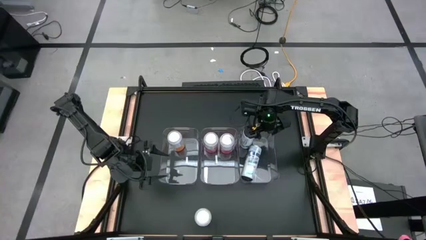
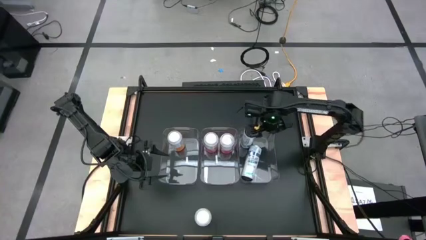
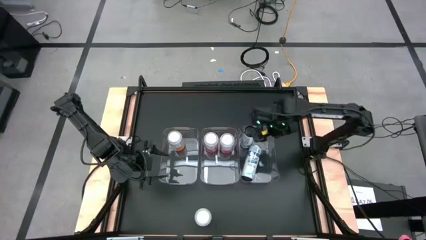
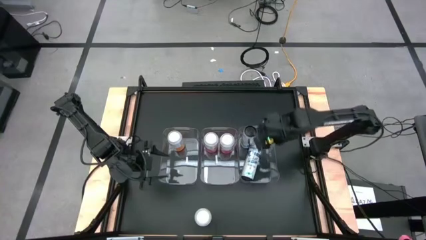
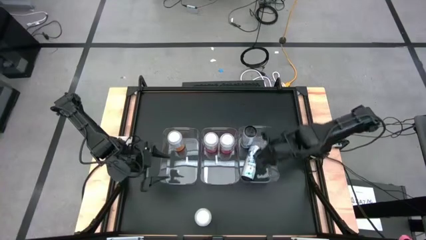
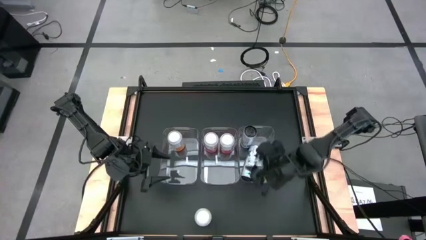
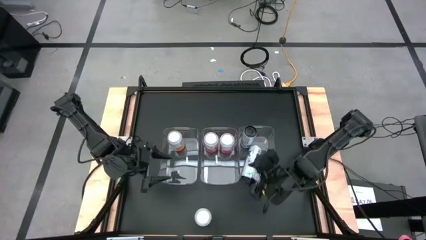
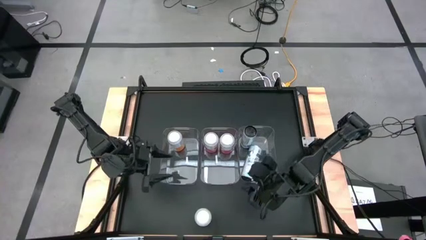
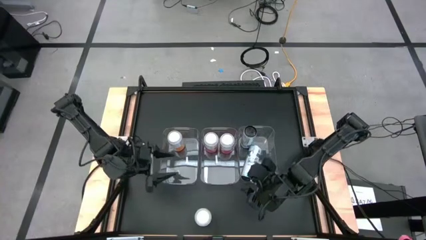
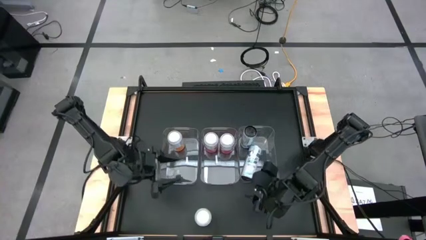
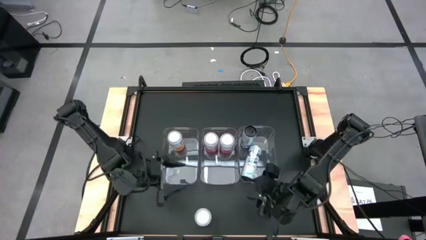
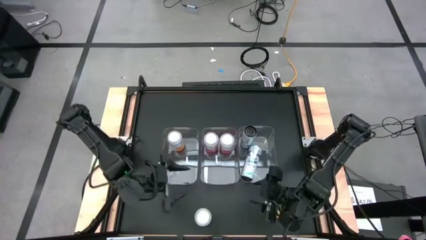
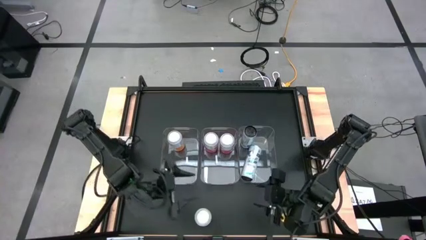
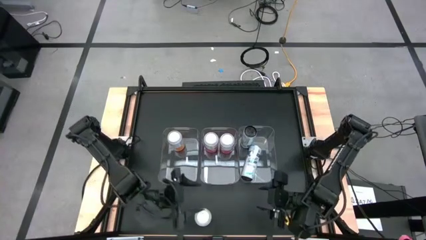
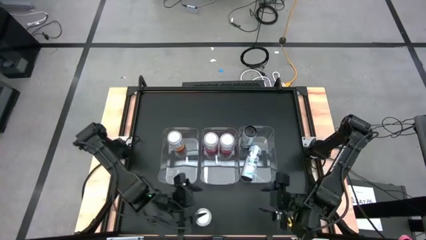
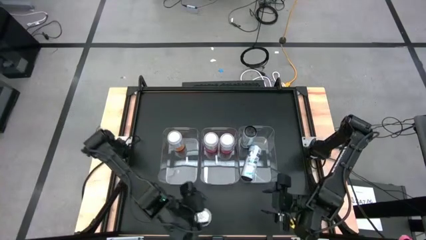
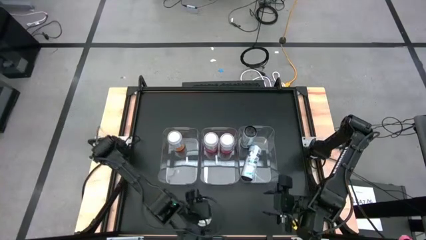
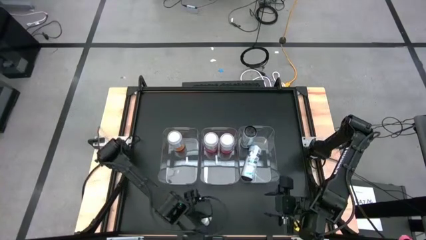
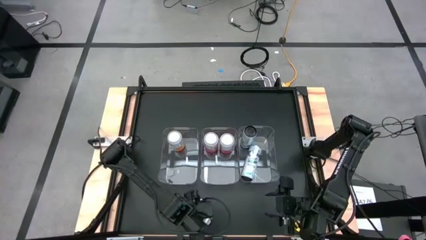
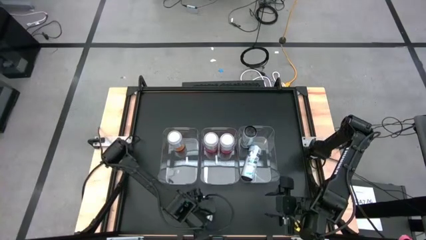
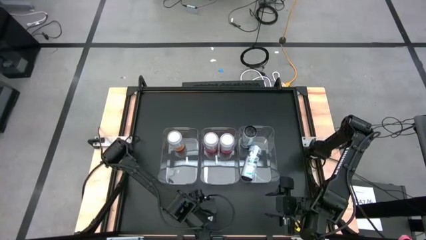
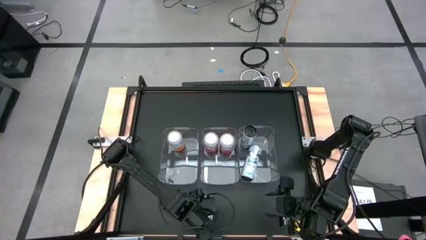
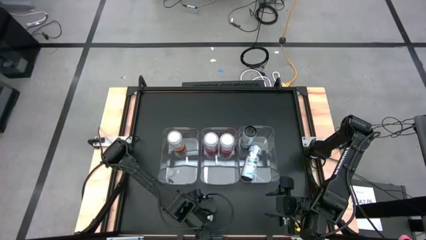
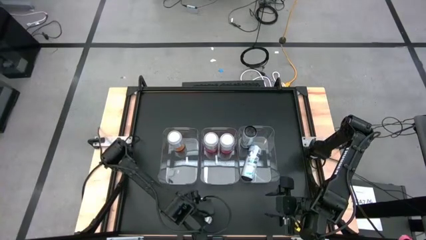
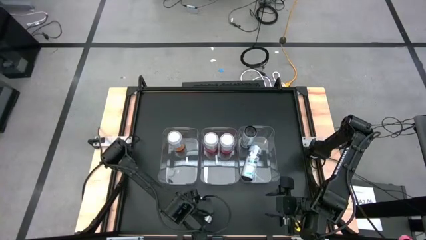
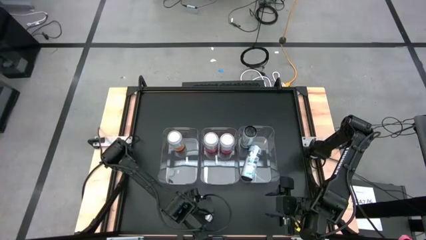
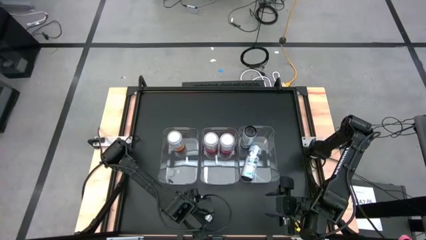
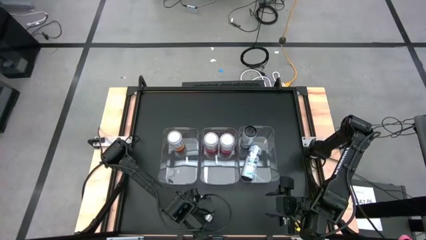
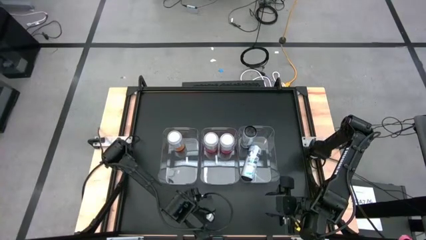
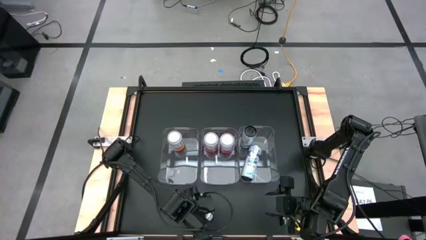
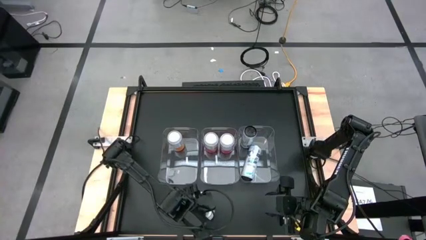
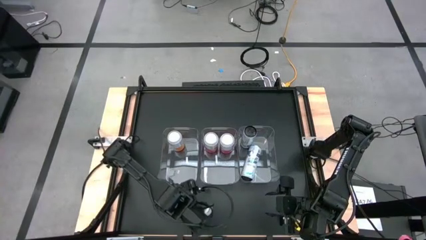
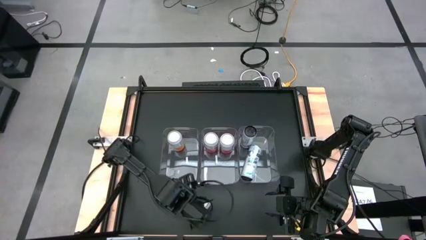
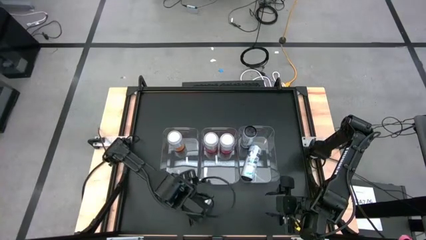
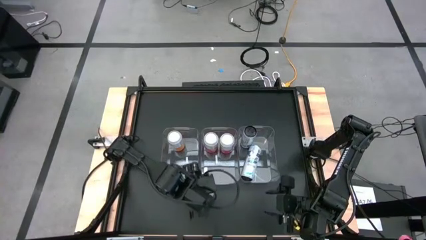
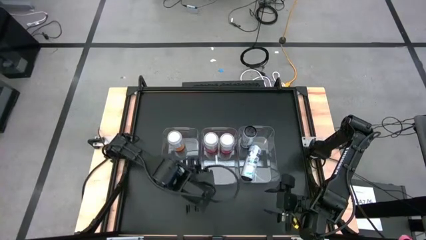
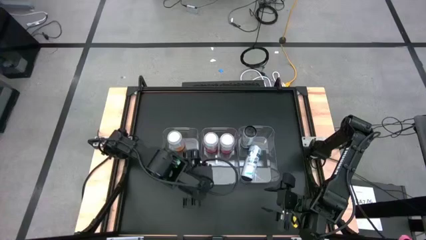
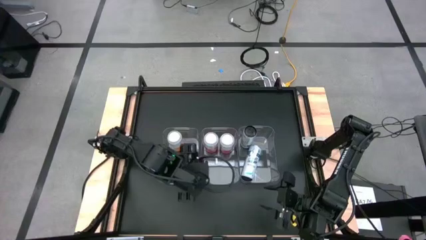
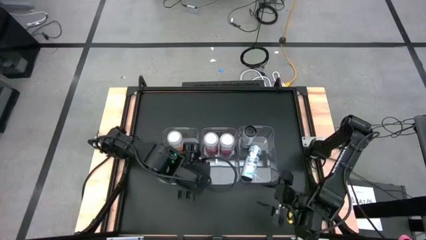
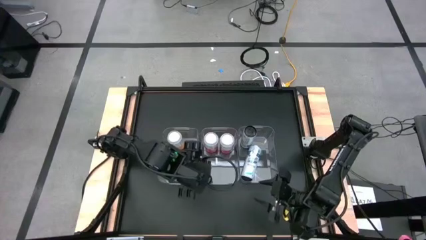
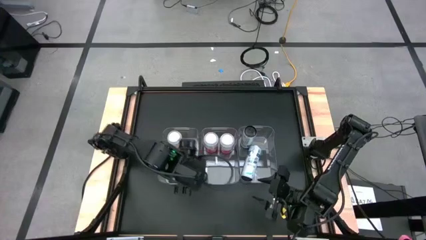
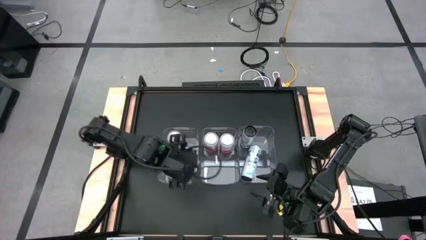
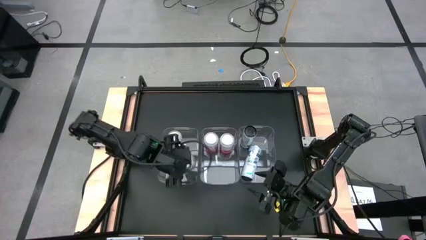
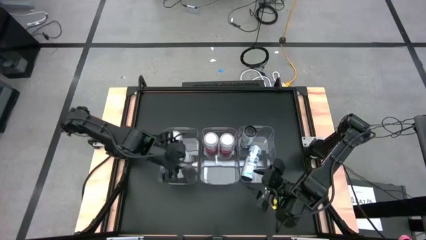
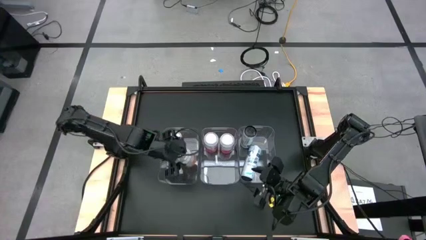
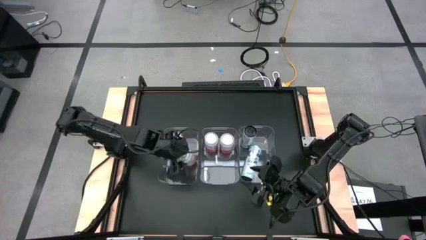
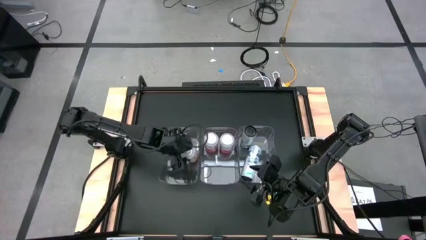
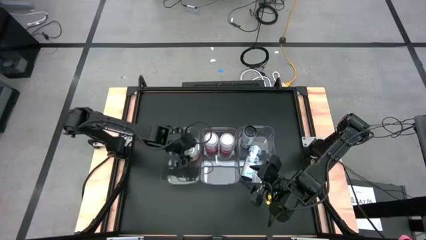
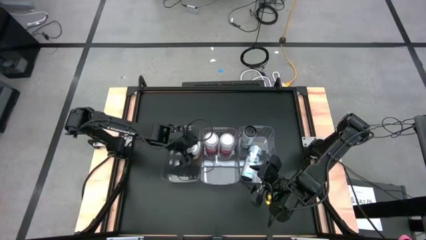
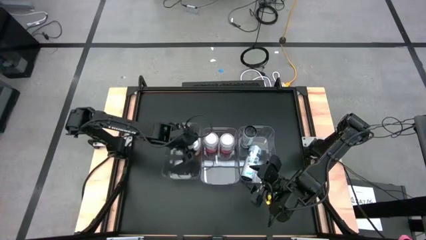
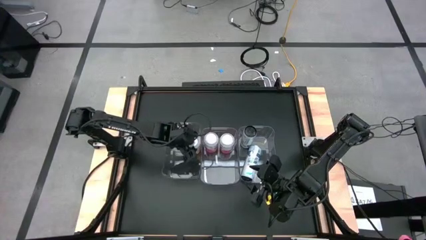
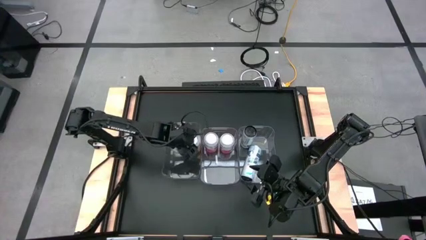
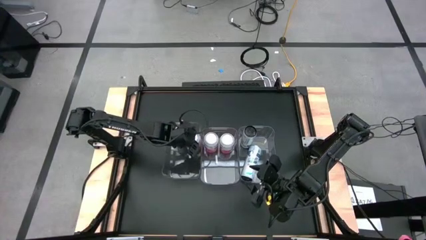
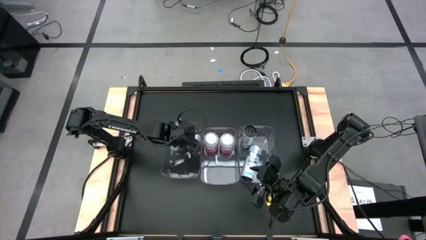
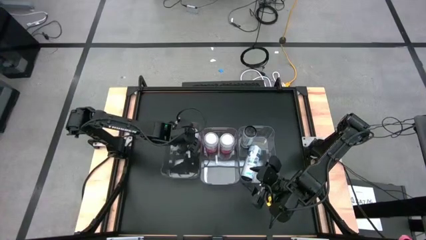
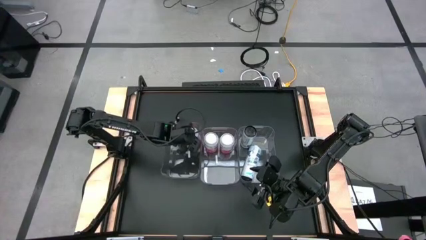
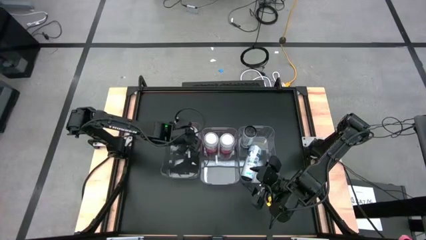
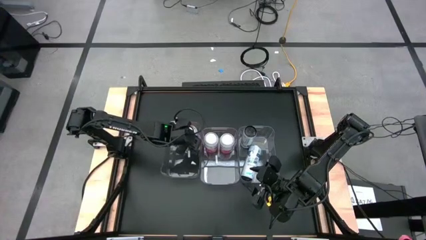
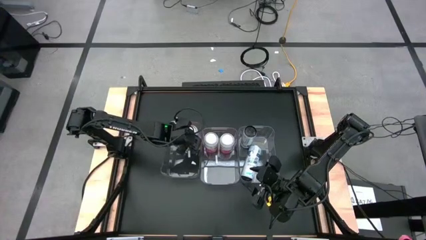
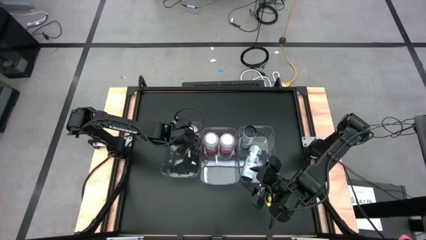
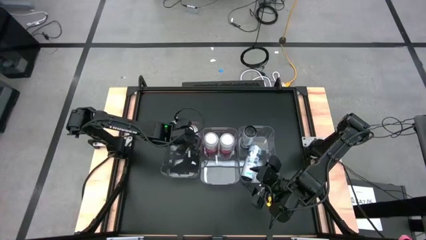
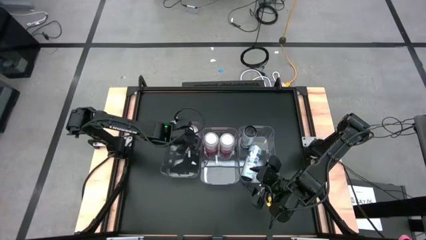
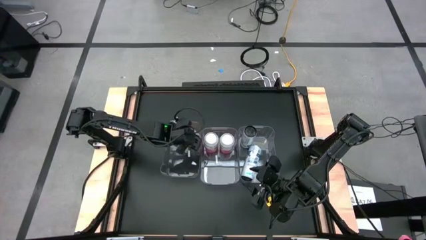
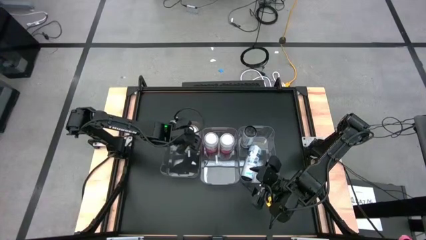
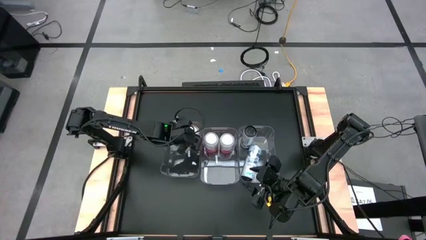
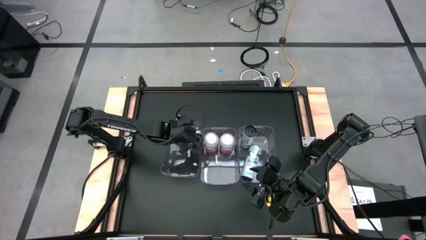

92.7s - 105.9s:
Task: Sort soda cans
Put the orange soda can into the left transparent bin
